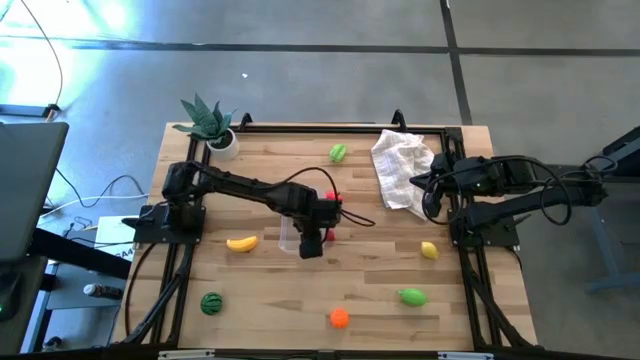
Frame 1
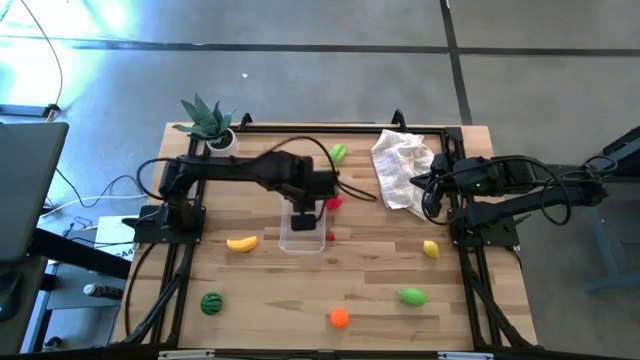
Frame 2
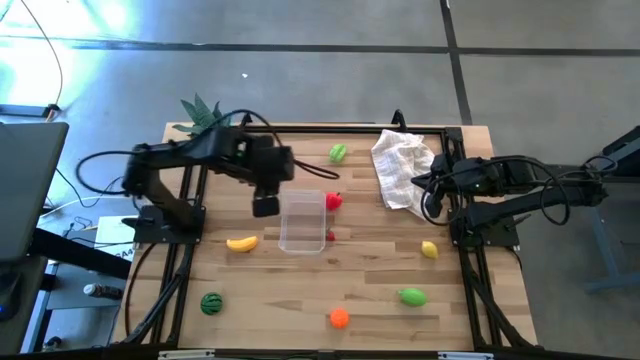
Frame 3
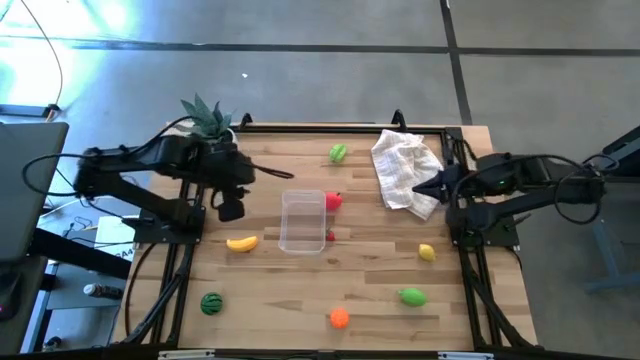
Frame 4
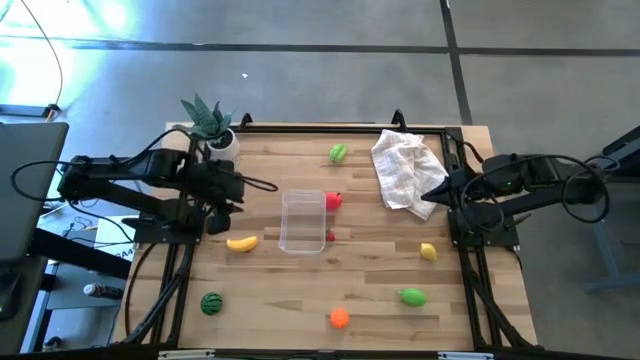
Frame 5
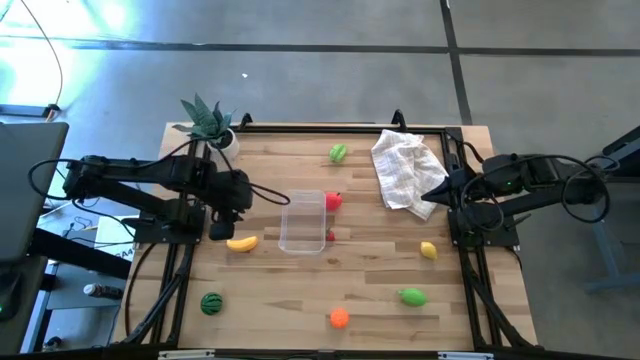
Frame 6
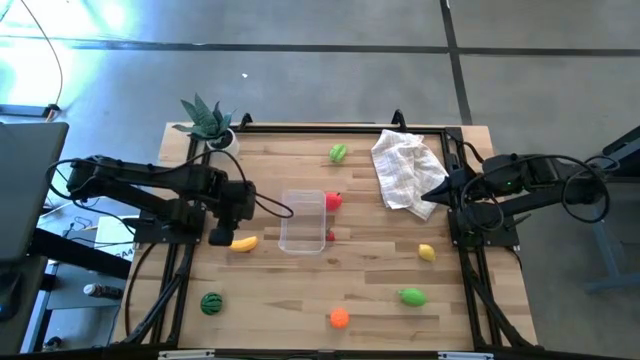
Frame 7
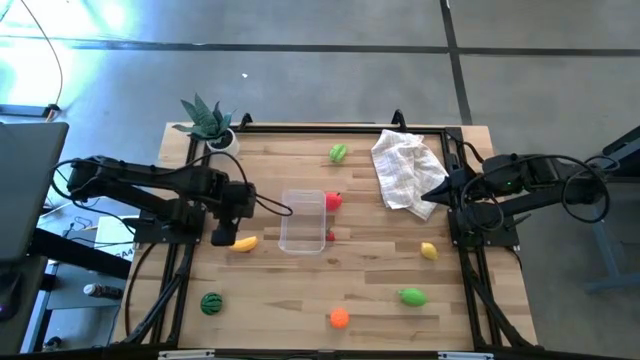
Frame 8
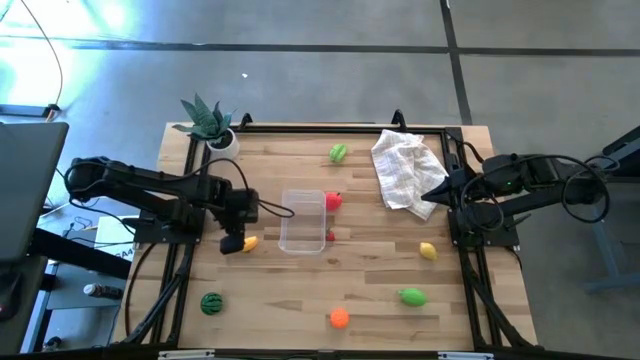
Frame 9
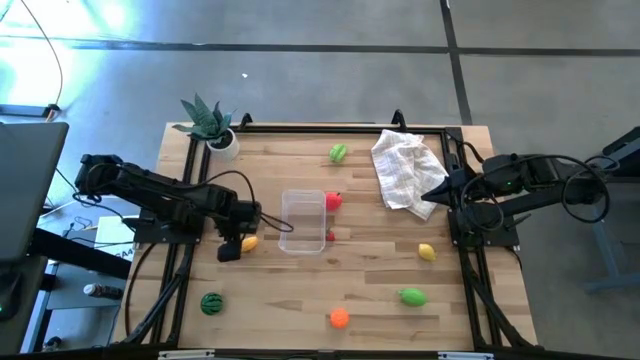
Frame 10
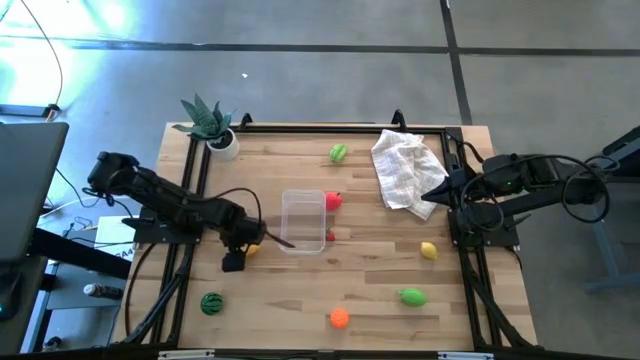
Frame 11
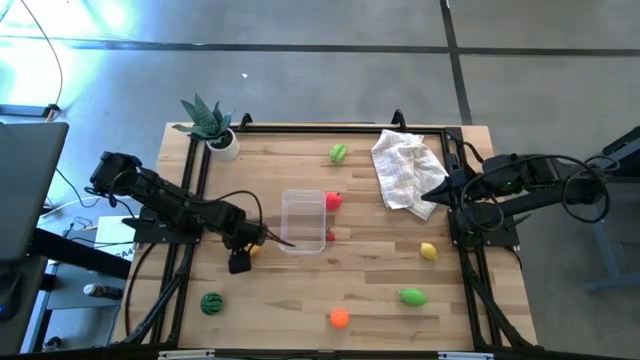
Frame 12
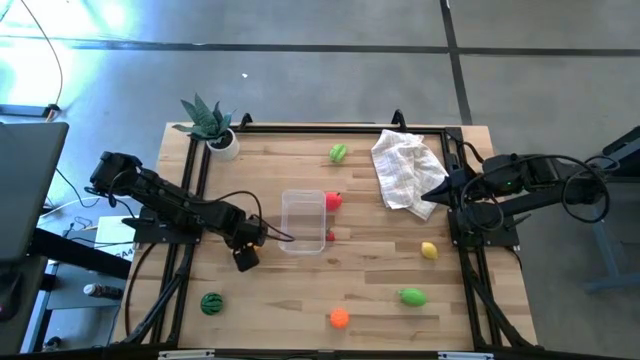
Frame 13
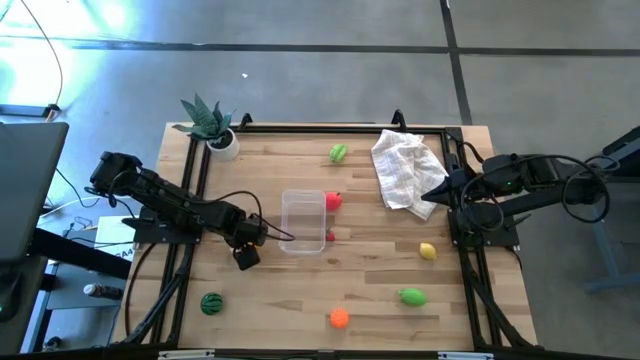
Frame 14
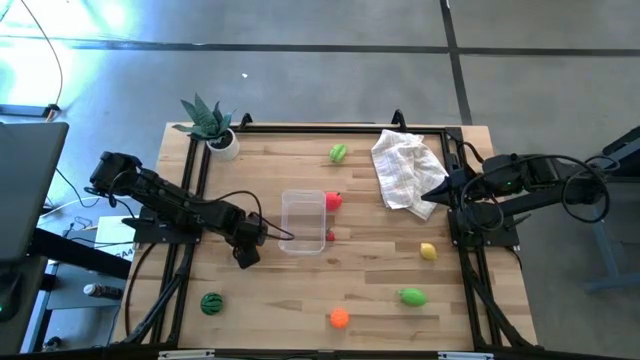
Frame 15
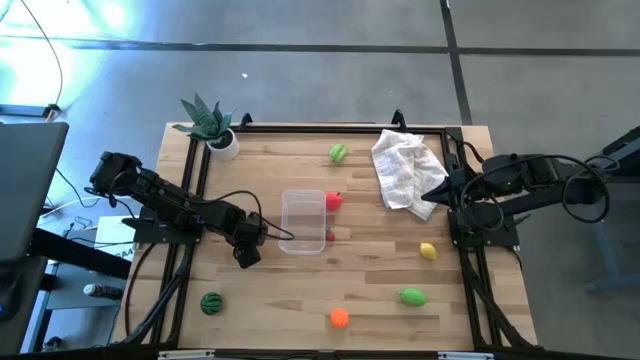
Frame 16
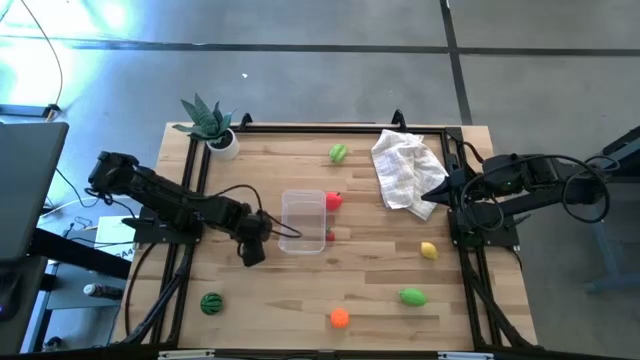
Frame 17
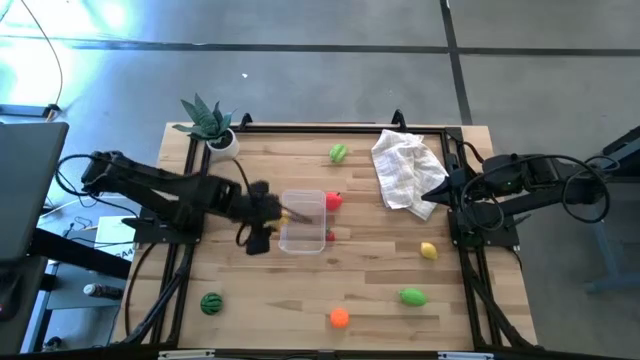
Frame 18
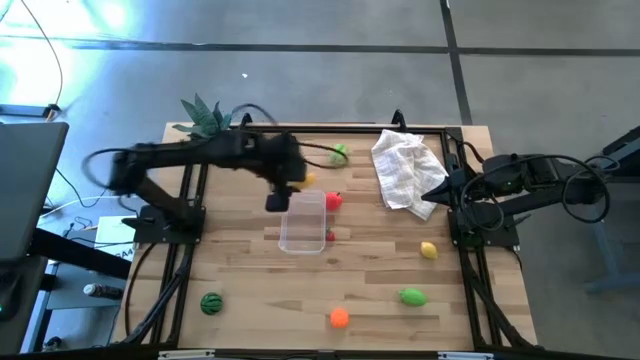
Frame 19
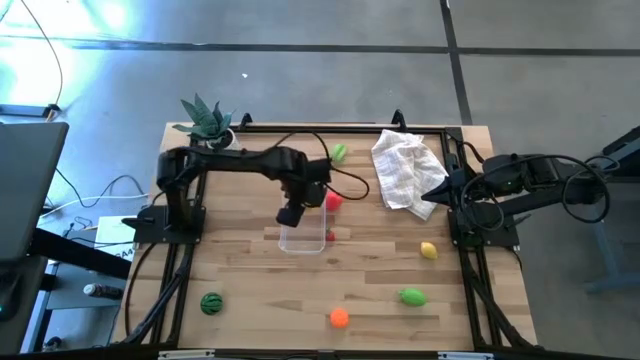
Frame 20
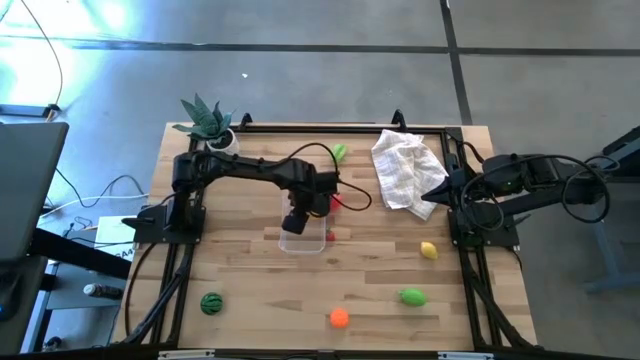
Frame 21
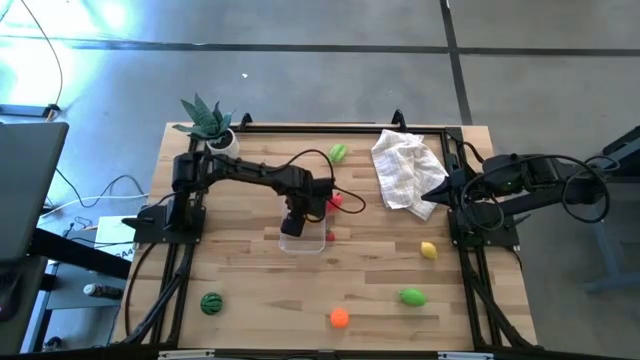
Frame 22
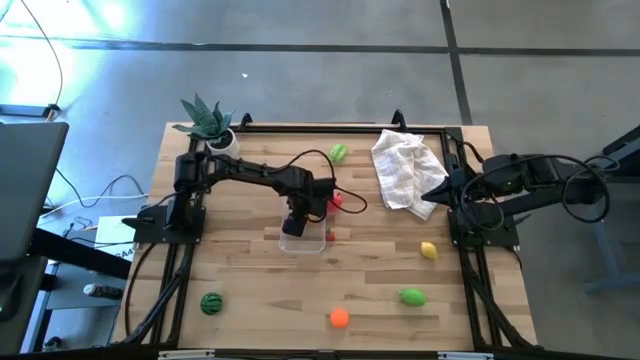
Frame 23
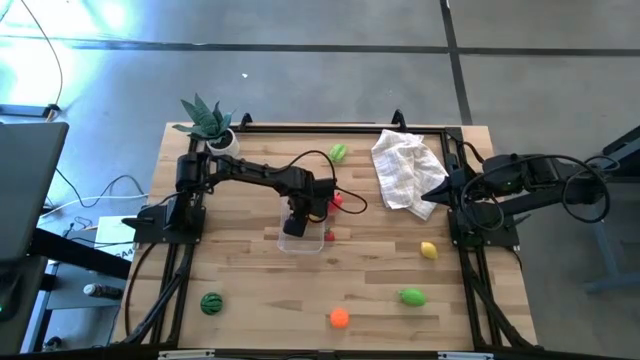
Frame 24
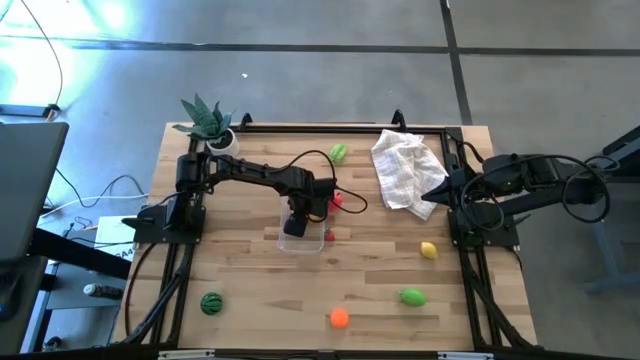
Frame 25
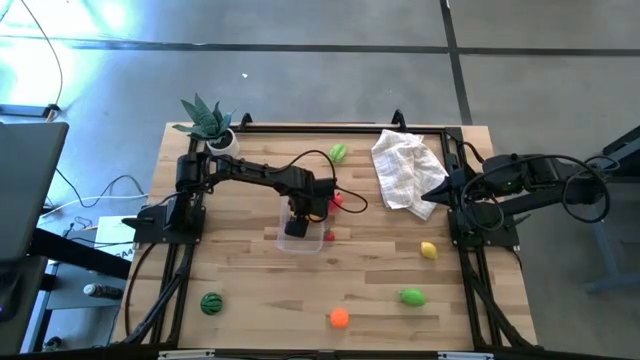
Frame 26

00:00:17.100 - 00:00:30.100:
Task: Pick and placing Produce into tupperware
Put the banana into the bin

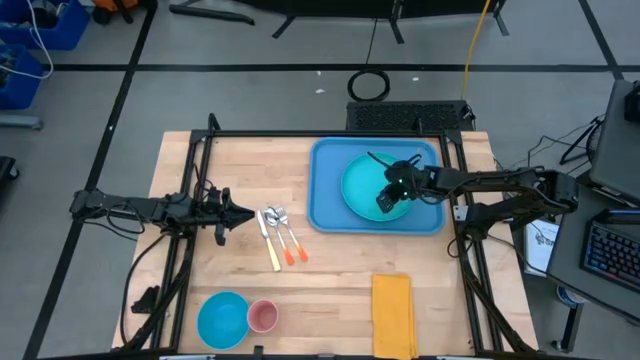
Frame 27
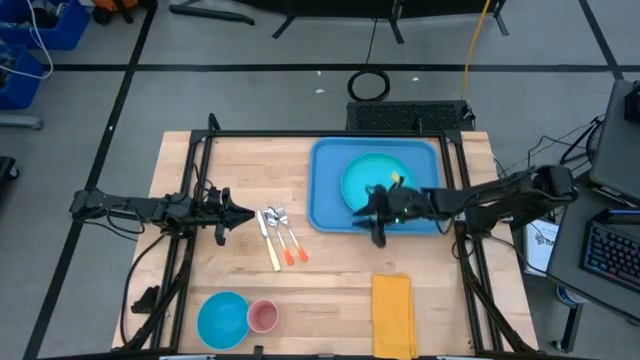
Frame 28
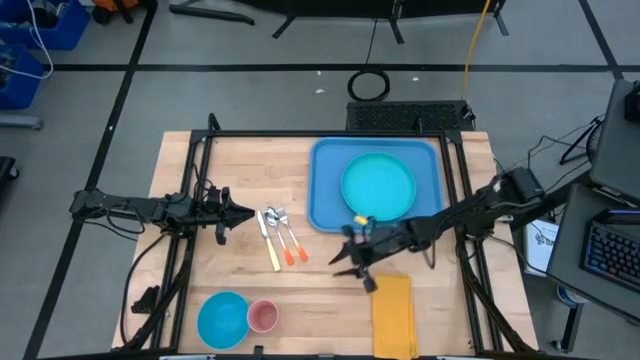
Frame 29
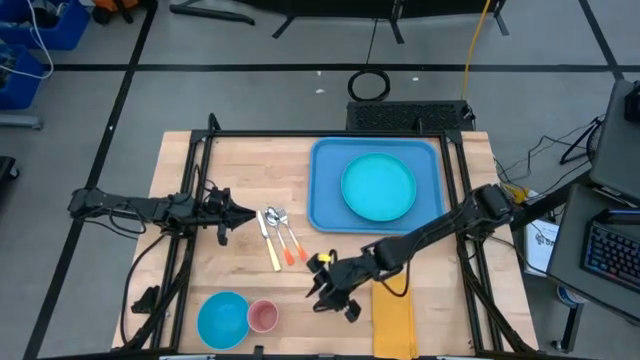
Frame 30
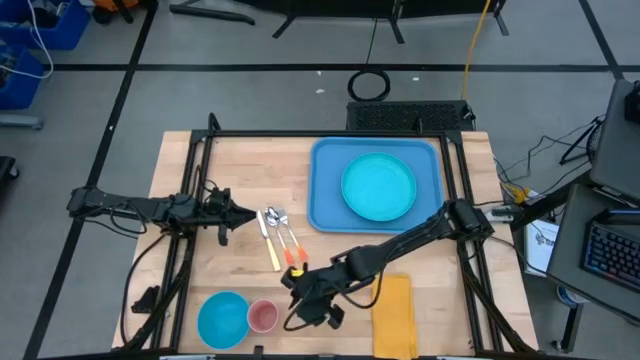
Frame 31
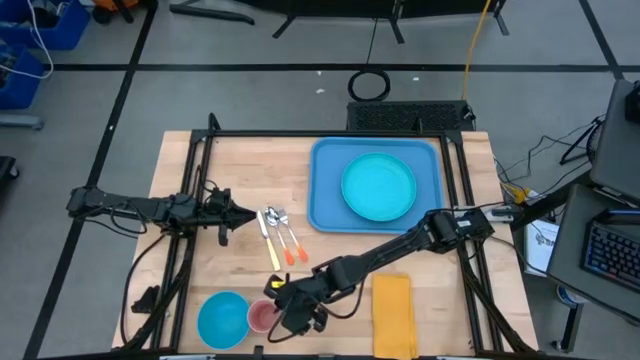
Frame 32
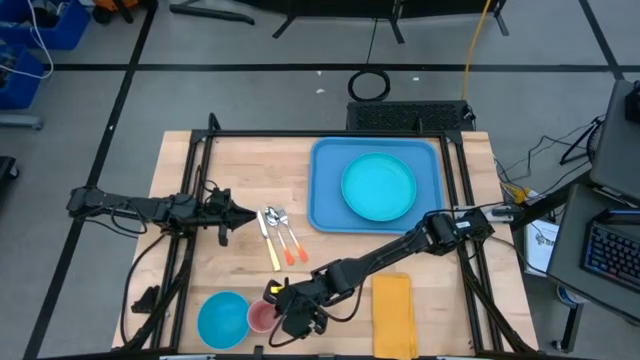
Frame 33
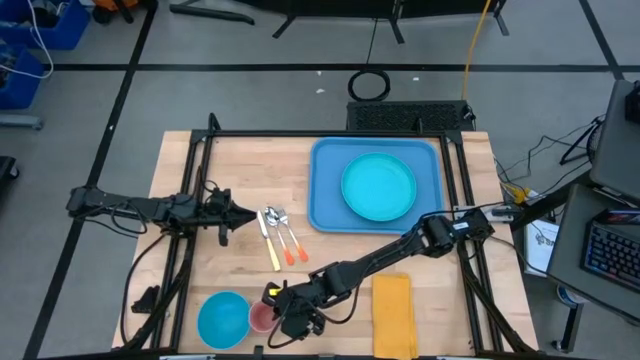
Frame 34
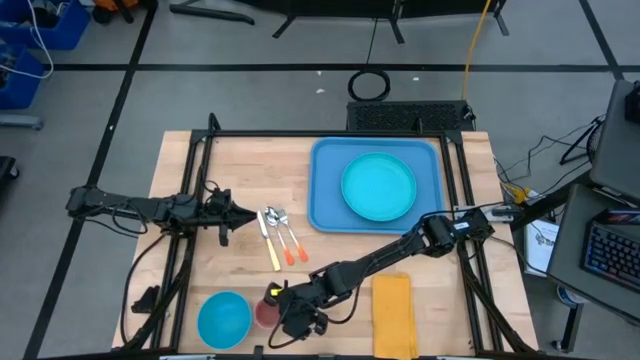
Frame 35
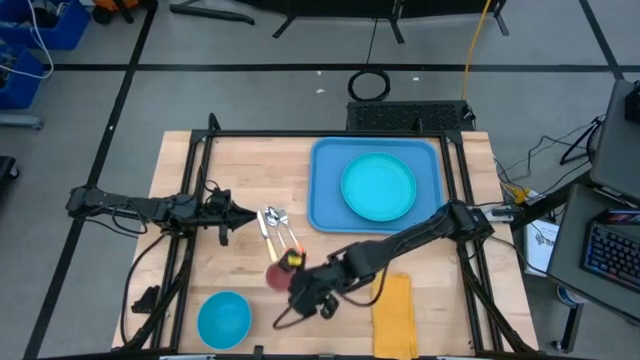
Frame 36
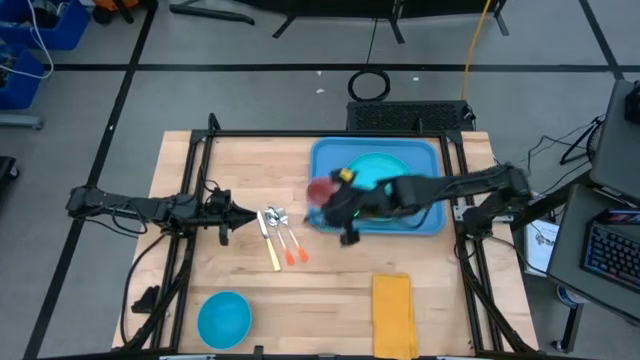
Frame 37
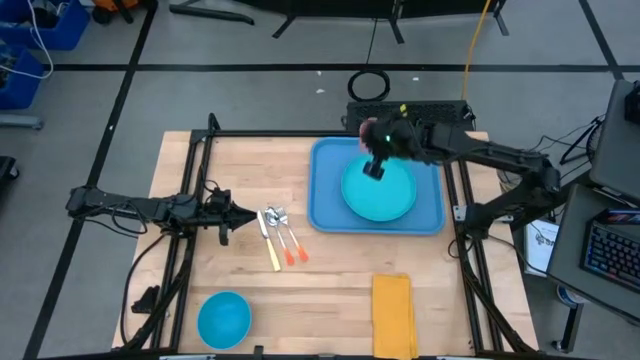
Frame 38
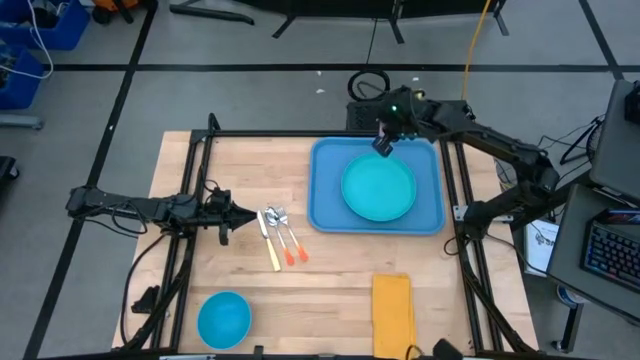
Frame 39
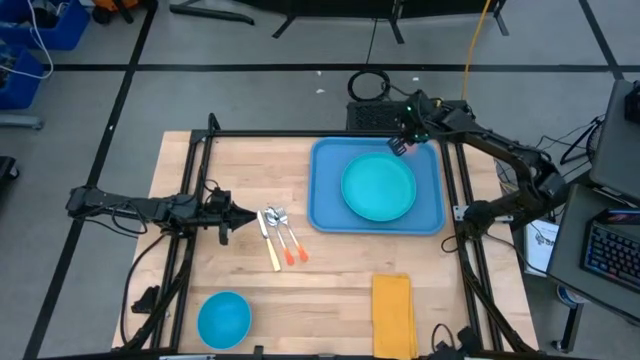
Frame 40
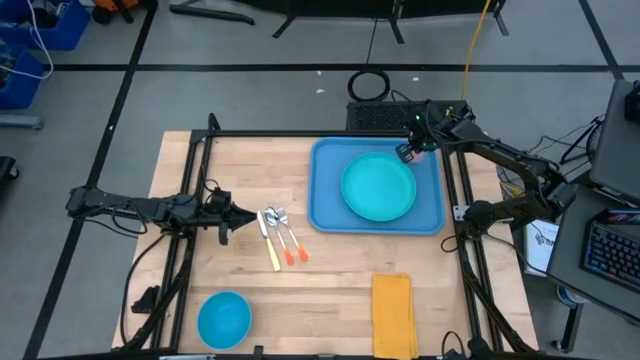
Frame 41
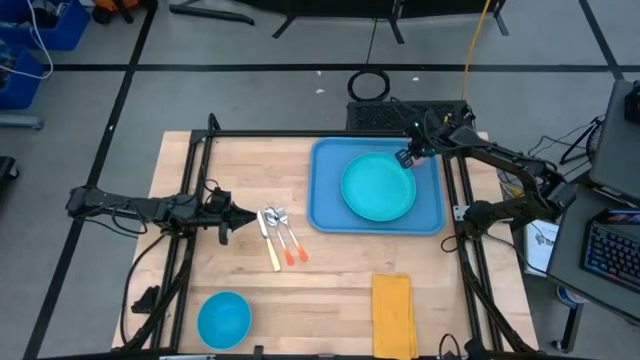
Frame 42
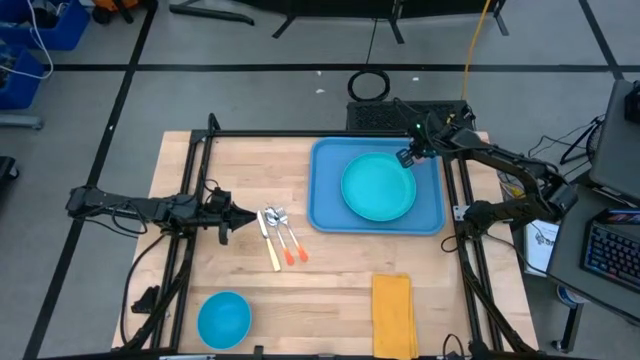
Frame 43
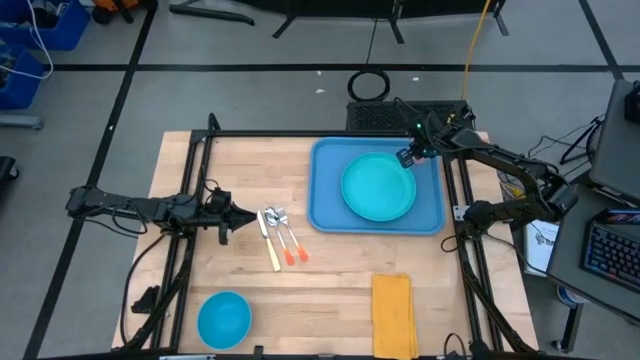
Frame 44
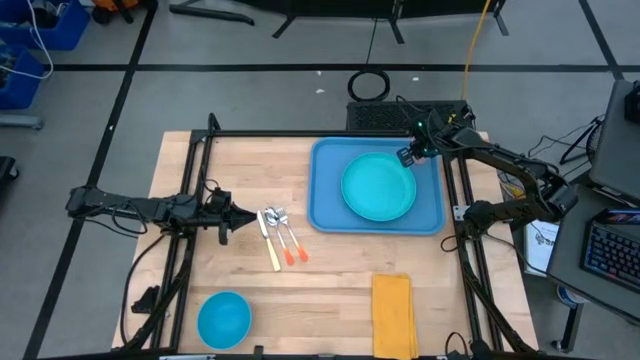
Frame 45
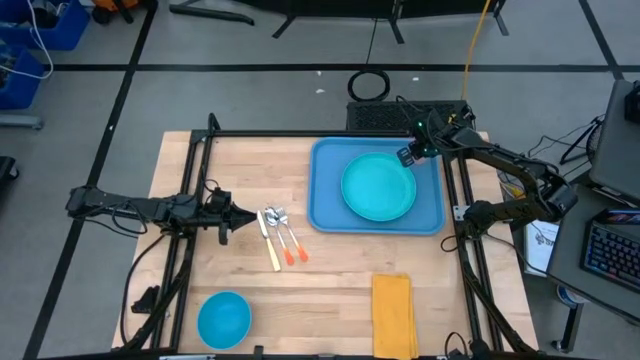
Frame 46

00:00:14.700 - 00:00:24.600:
Task: Set up tray
Put the pink cup onto the blue tray
